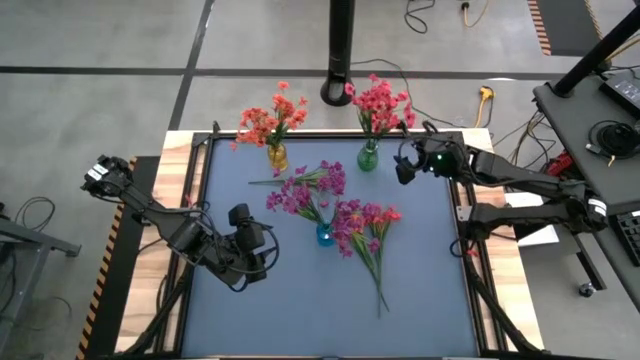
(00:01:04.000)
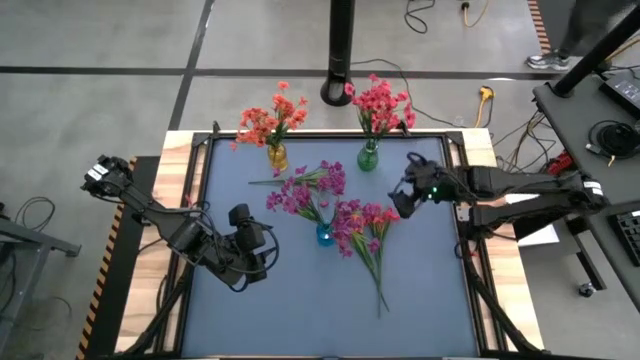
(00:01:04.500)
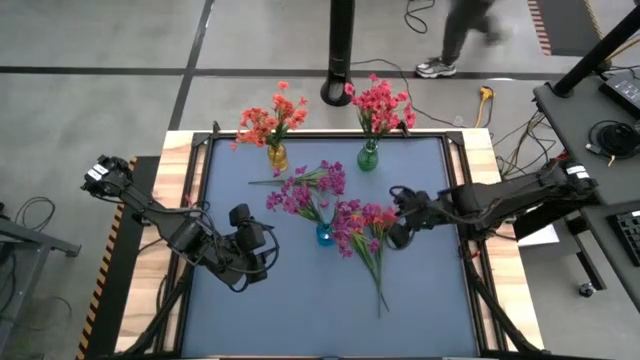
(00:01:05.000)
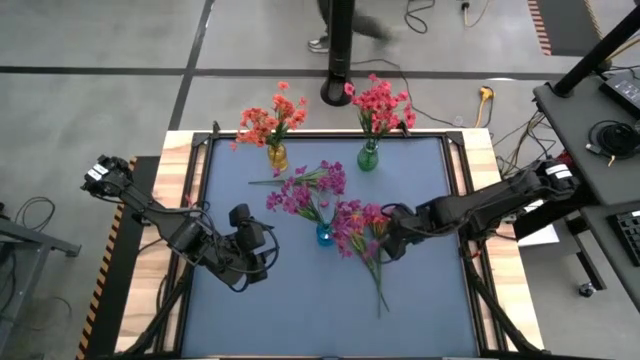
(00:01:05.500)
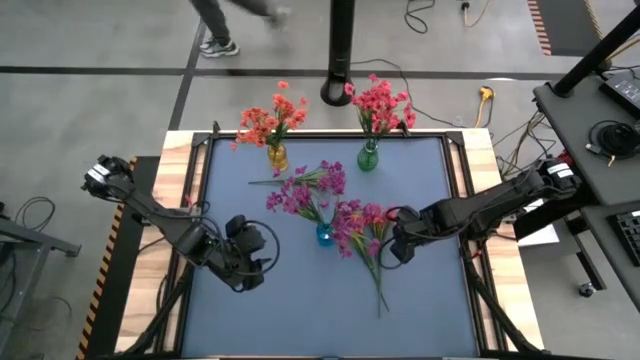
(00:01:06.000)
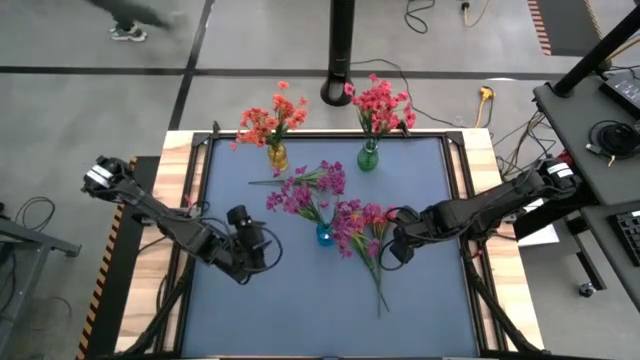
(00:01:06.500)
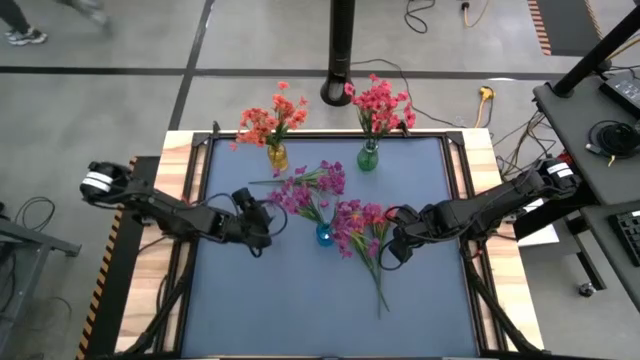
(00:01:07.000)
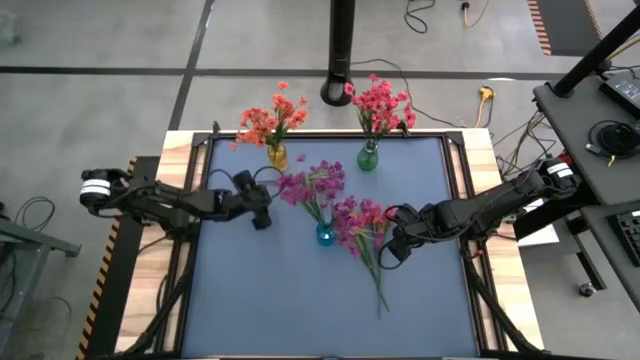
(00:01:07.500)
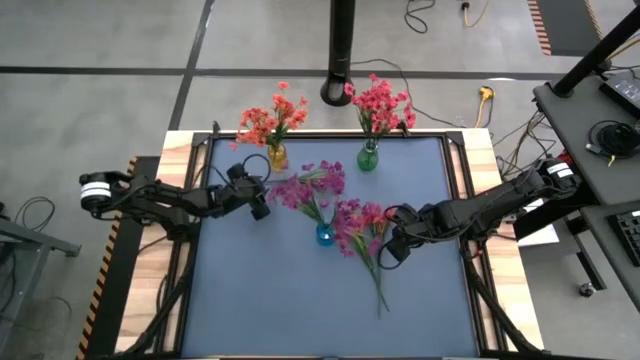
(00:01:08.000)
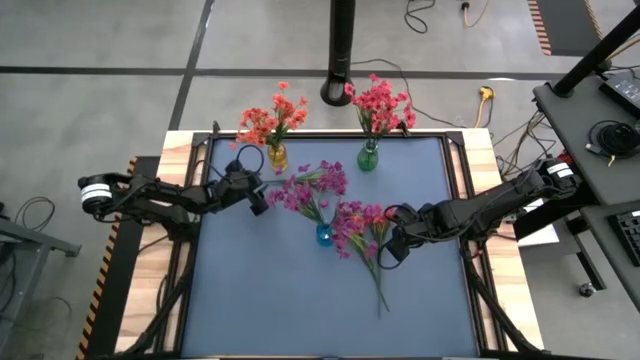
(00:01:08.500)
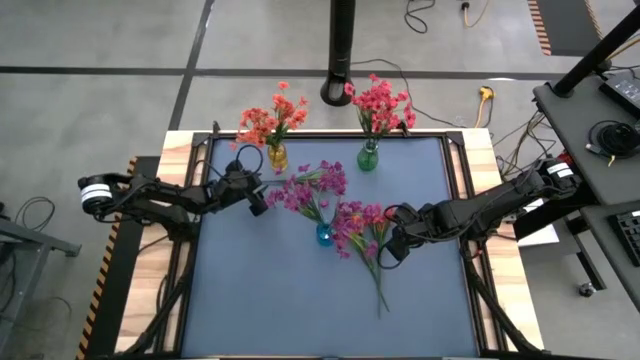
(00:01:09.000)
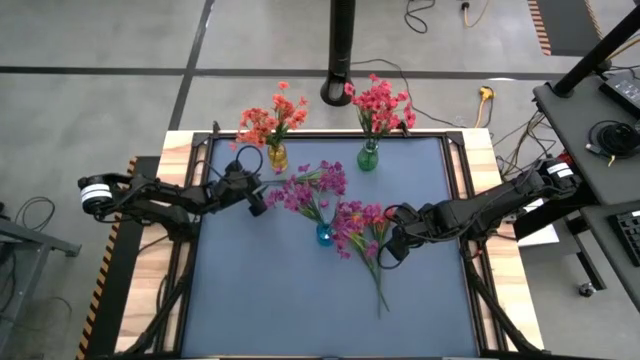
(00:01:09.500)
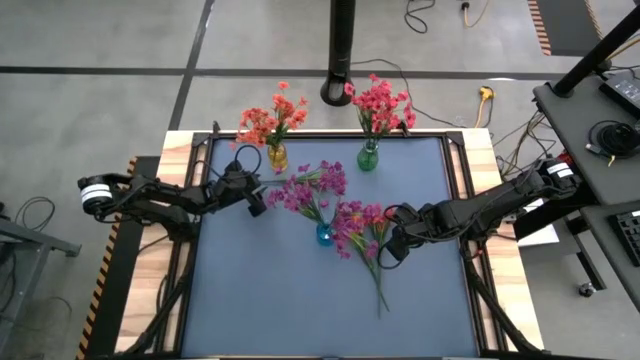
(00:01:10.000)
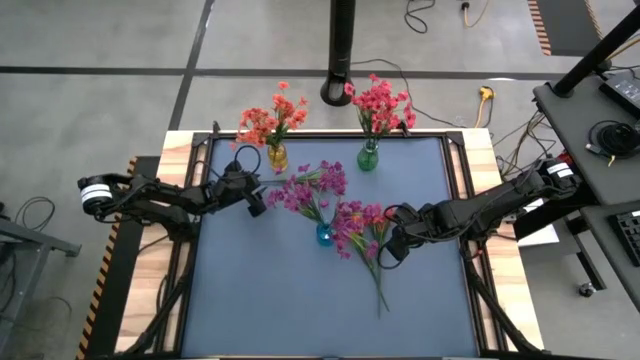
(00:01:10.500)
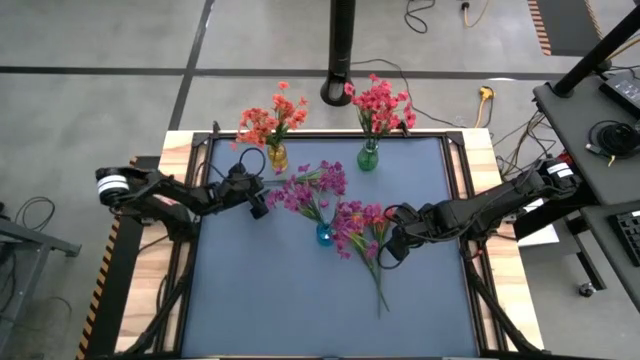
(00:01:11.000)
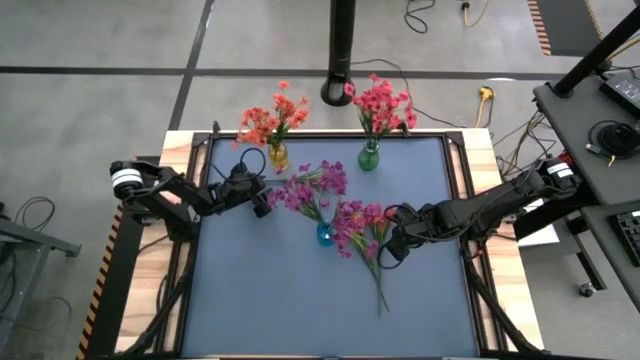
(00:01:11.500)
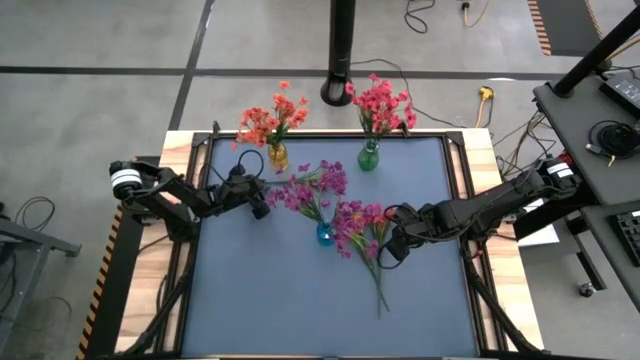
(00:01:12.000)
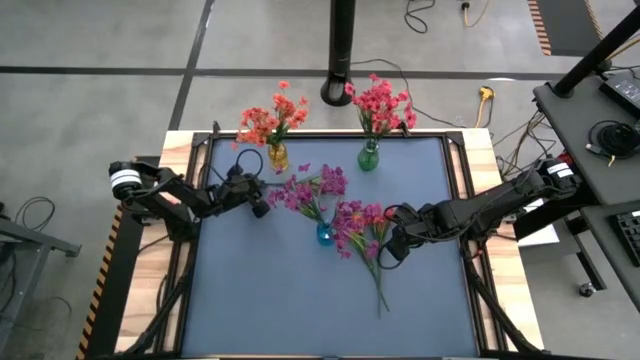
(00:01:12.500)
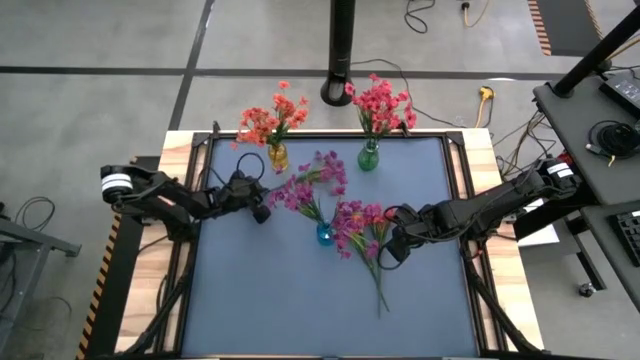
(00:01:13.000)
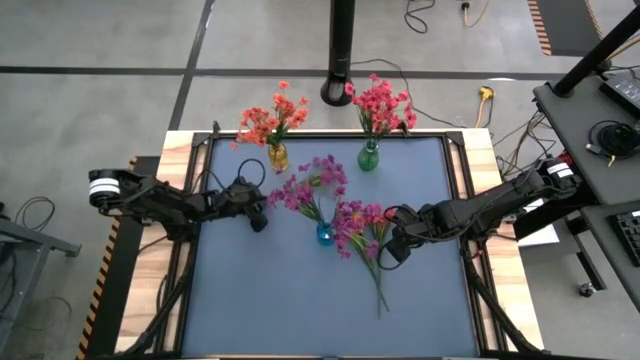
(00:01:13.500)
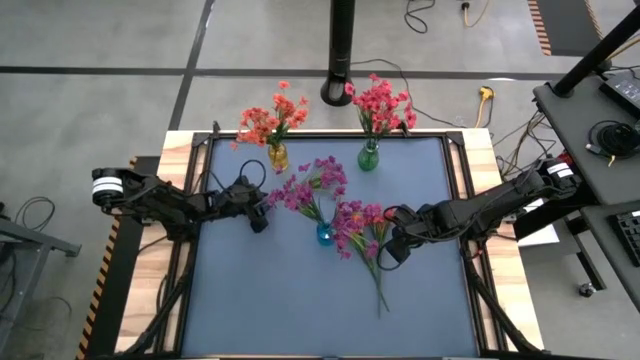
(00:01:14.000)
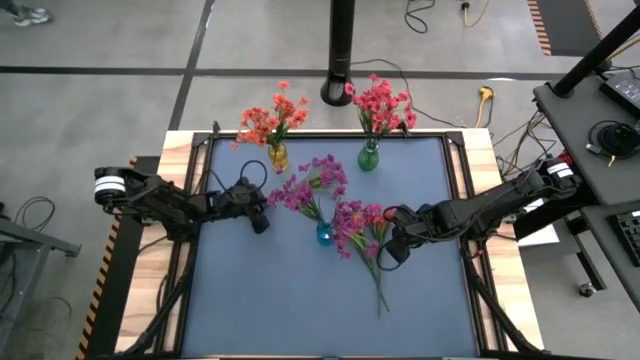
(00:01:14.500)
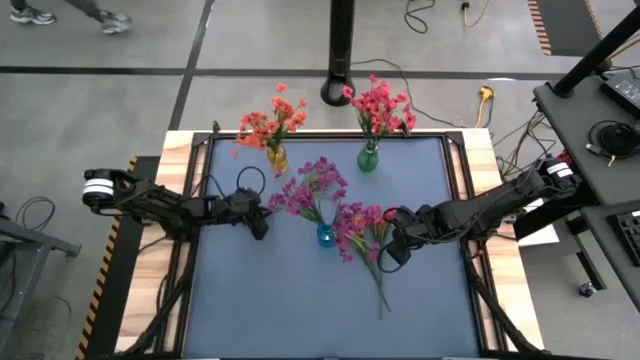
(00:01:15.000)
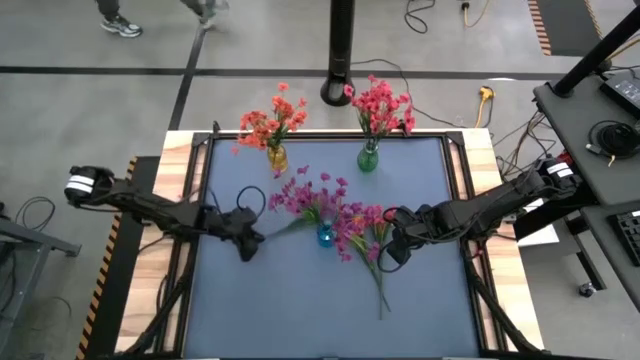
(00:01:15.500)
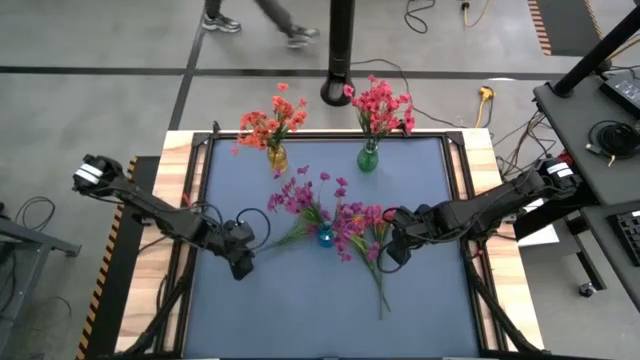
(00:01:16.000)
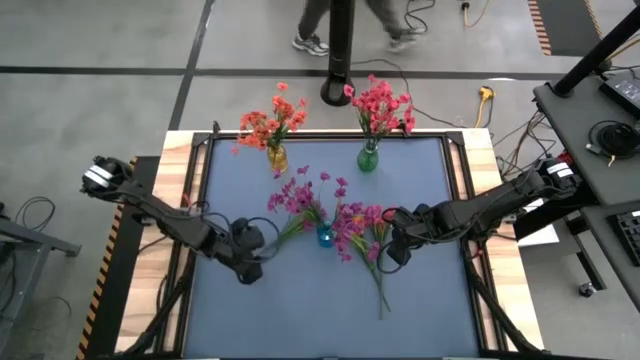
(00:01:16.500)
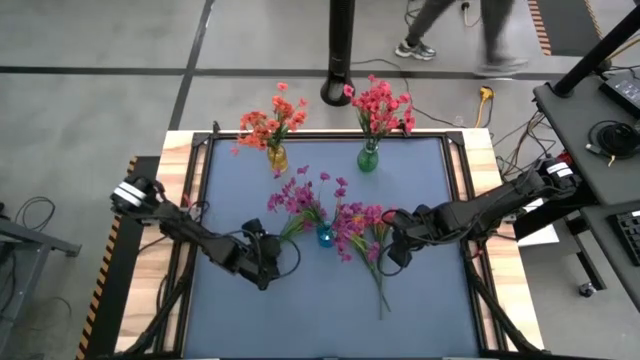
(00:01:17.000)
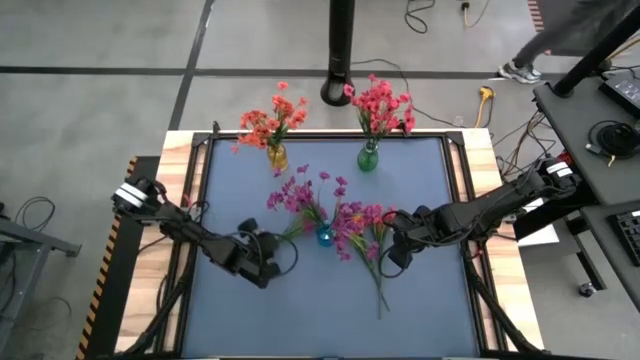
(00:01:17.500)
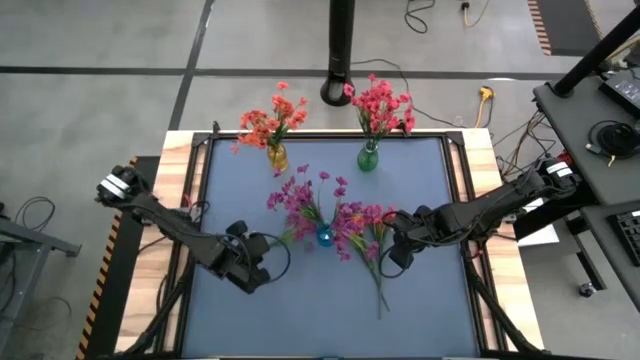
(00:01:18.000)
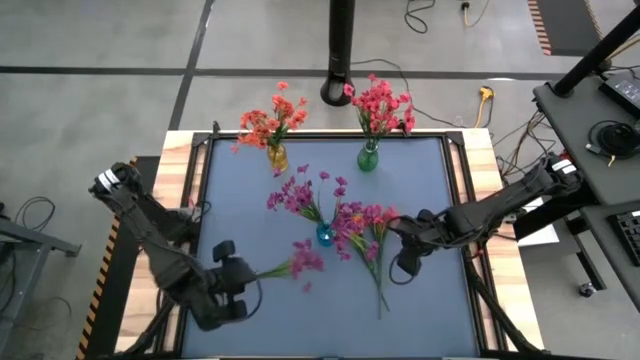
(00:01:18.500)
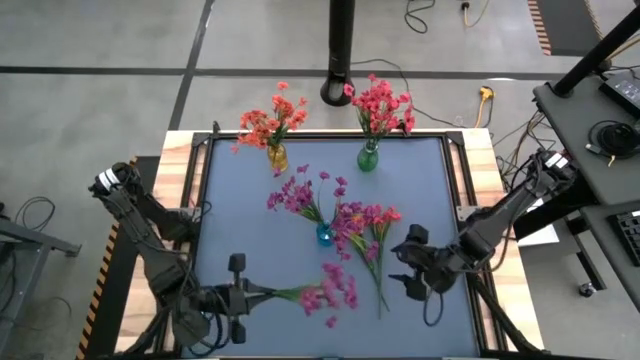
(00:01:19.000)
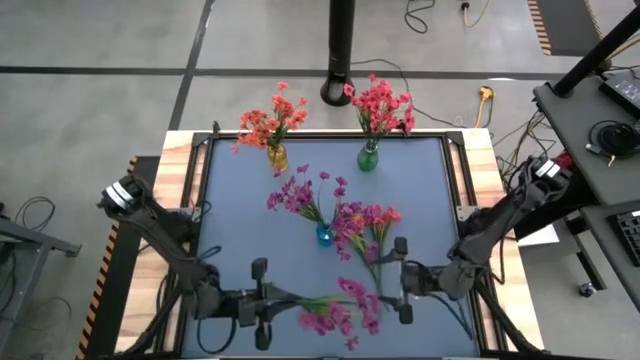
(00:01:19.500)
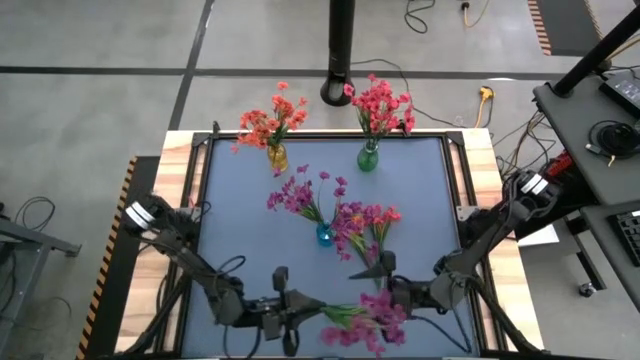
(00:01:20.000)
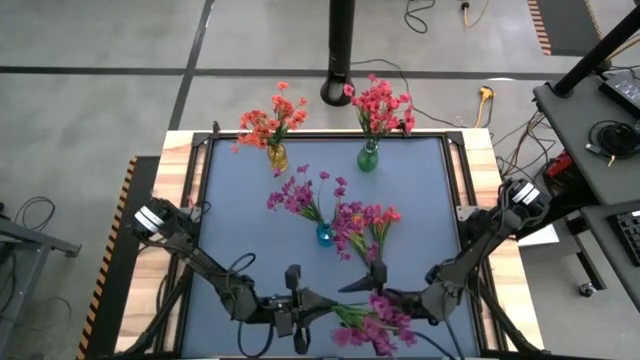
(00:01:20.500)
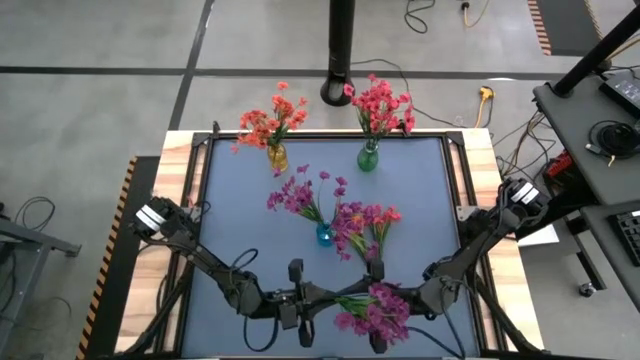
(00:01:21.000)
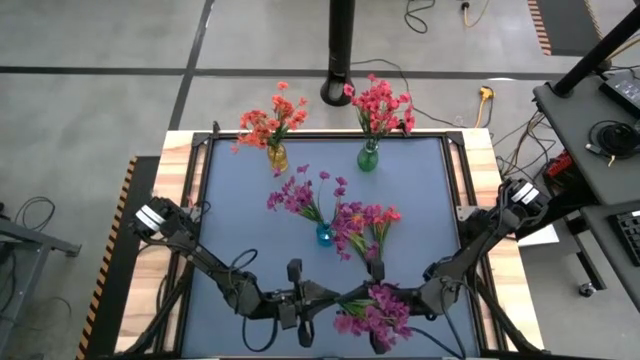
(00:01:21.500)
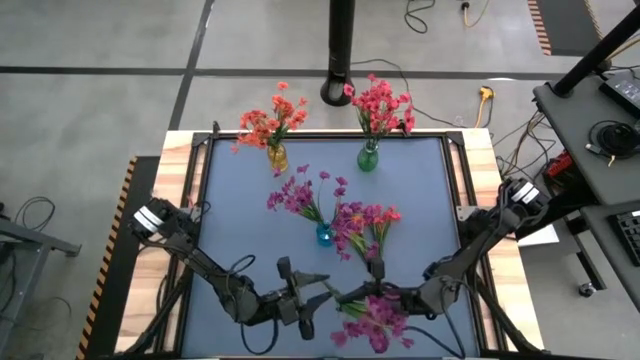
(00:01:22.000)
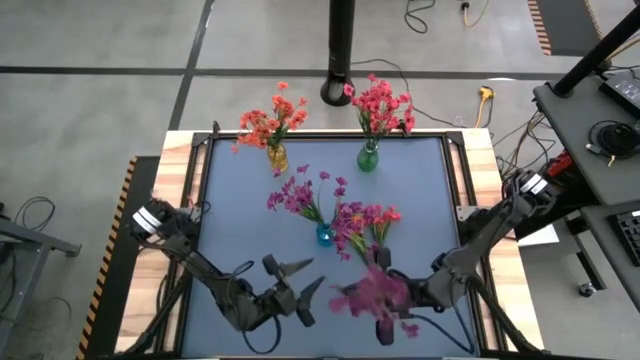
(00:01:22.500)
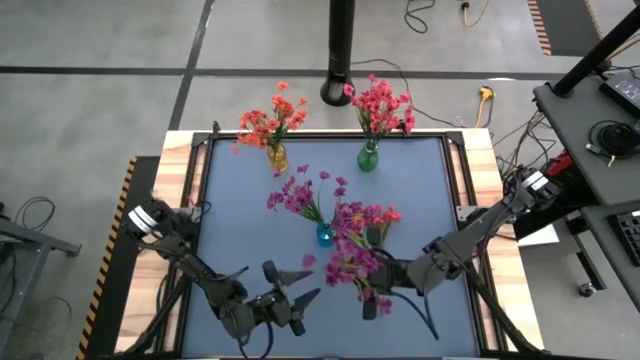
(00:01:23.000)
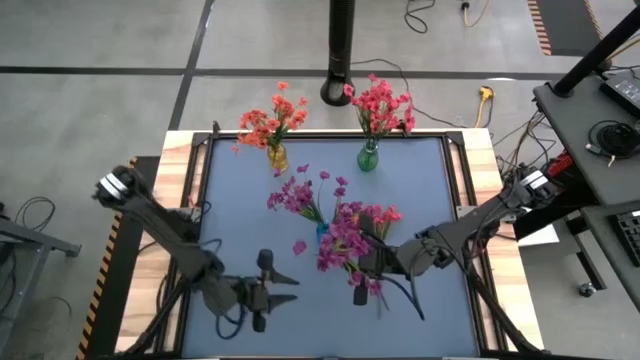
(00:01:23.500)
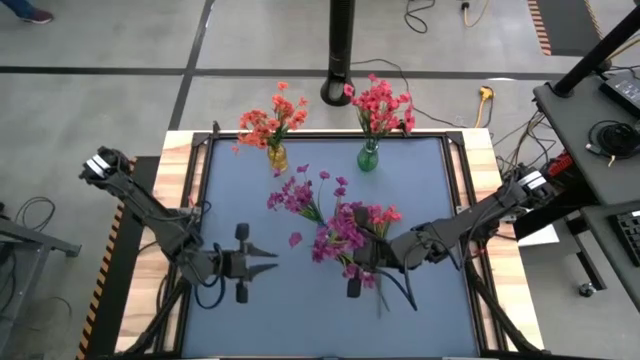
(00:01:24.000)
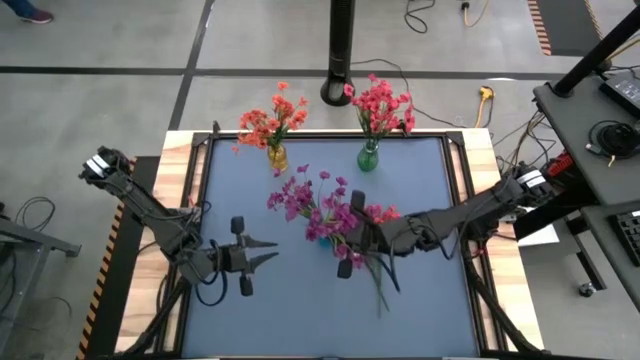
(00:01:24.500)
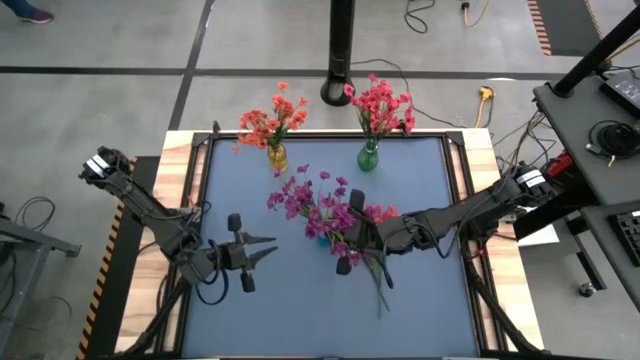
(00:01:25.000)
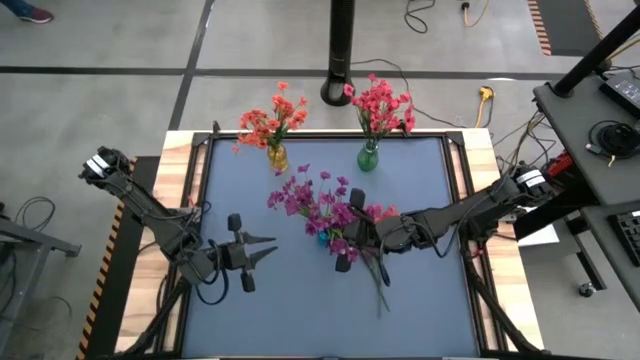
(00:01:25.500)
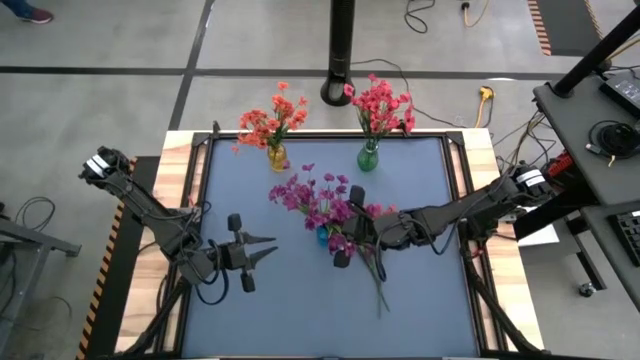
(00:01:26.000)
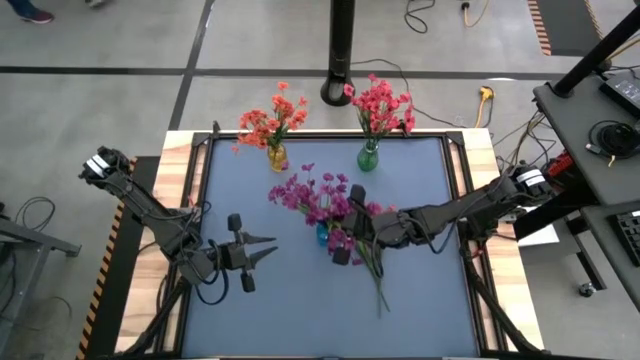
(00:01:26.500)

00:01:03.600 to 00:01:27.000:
Task: Sort flowers into vase by color
Put the violet flower into the blue vase
